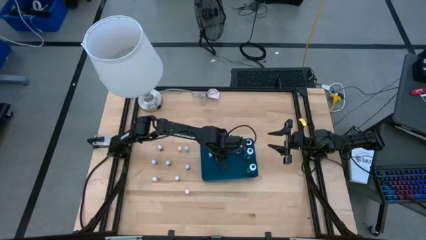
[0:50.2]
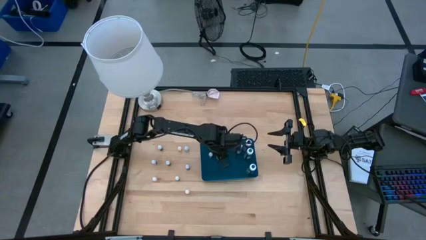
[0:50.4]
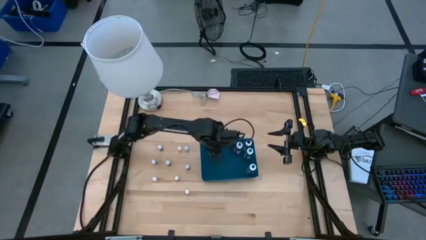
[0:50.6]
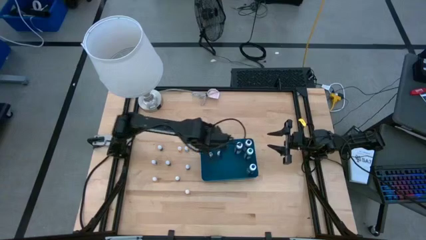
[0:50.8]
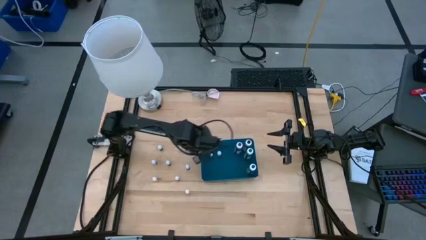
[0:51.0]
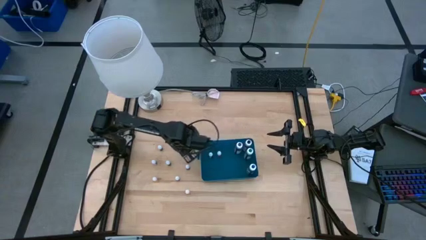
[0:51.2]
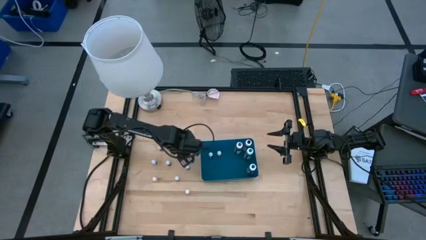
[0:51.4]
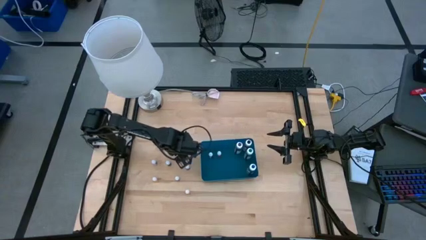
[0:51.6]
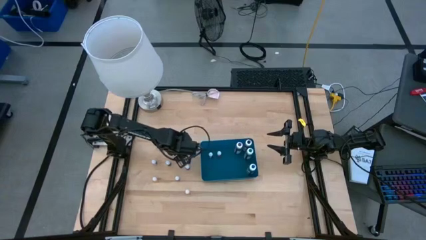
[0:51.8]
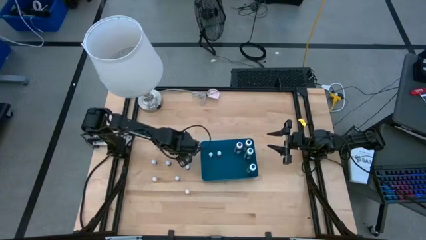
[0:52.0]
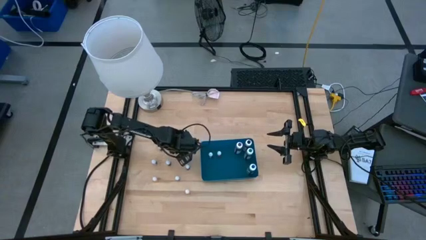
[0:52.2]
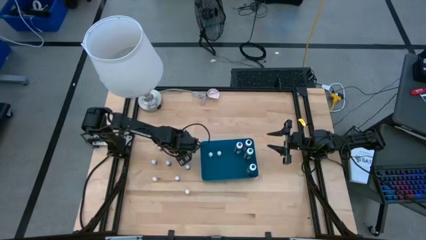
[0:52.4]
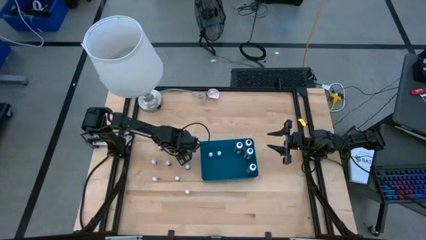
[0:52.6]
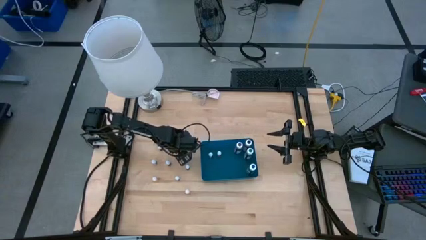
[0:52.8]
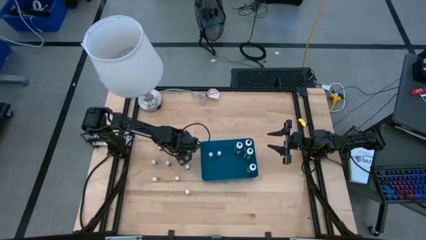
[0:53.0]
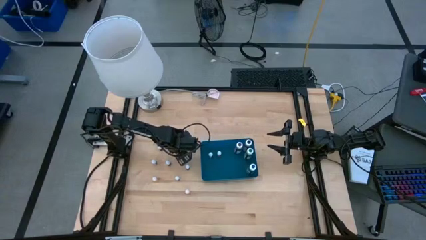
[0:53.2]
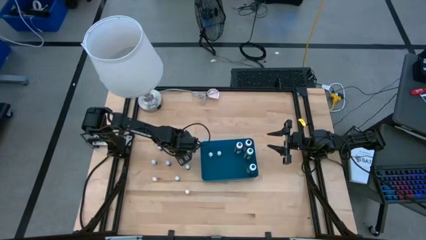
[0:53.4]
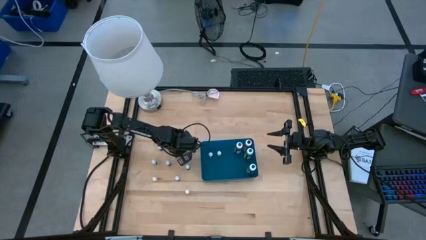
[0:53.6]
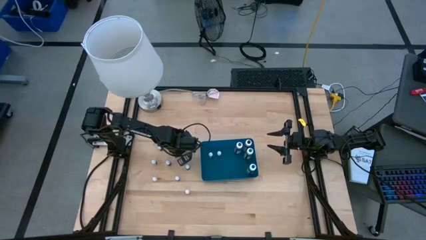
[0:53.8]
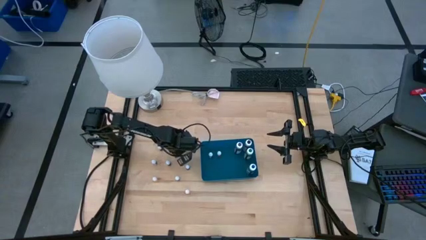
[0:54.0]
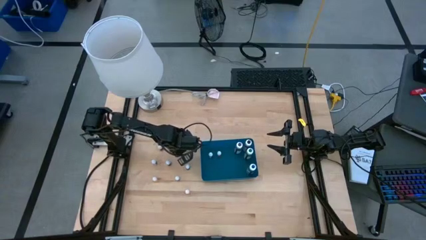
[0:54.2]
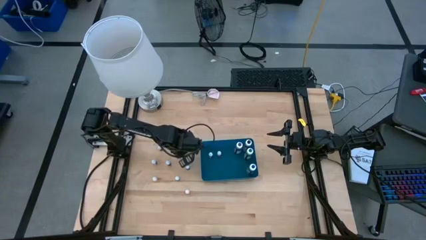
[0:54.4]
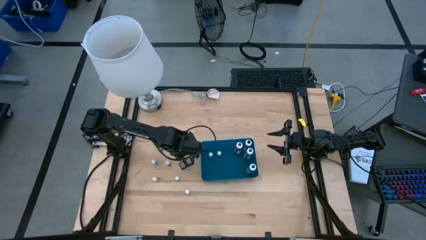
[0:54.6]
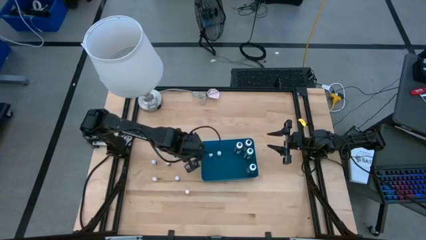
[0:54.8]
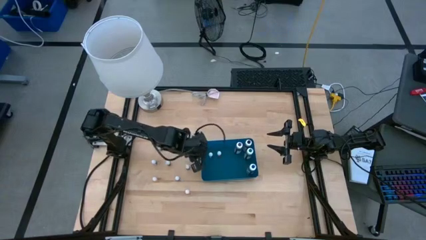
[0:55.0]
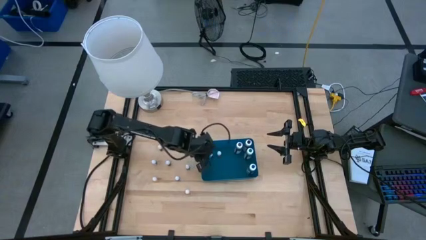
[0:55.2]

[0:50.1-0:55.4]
Task: Pick & Place food coloring
Put the small orange food coloring bottle into the blue bin

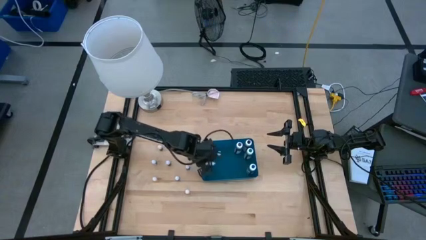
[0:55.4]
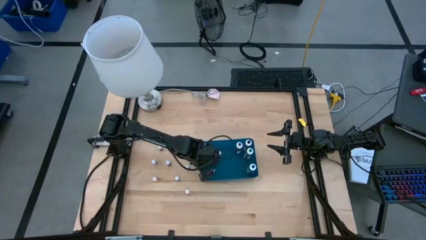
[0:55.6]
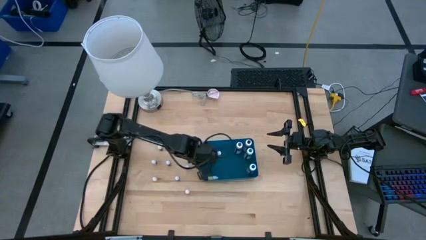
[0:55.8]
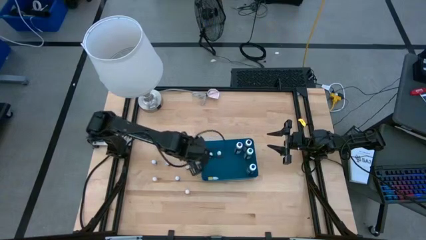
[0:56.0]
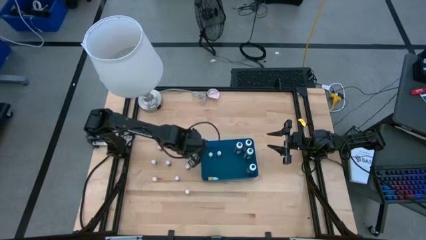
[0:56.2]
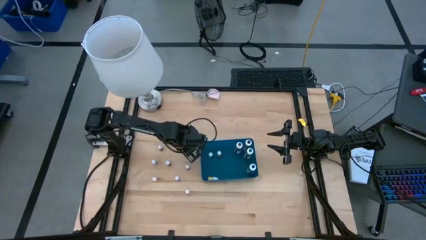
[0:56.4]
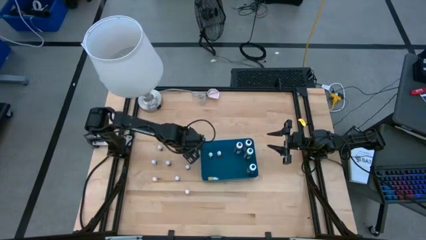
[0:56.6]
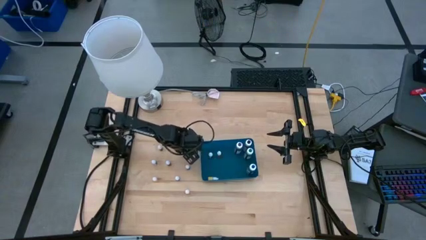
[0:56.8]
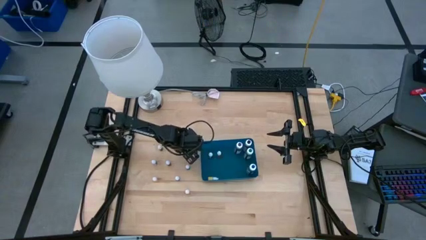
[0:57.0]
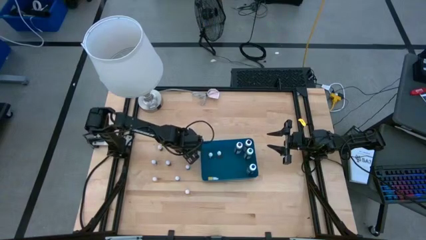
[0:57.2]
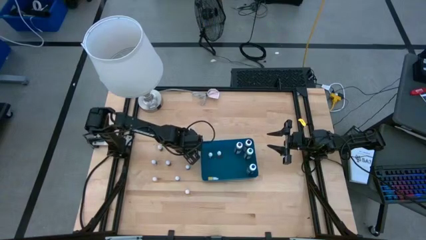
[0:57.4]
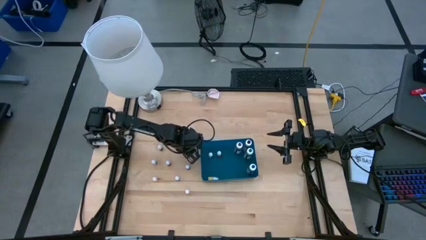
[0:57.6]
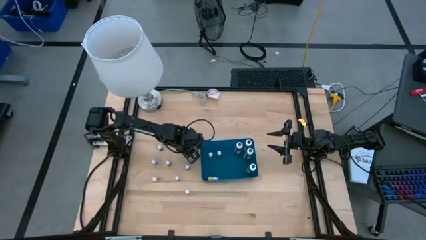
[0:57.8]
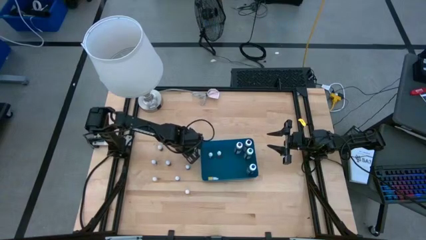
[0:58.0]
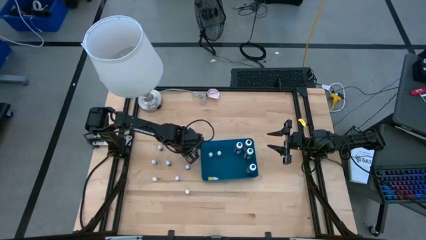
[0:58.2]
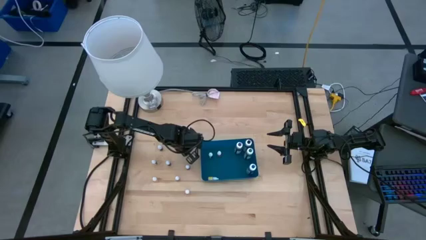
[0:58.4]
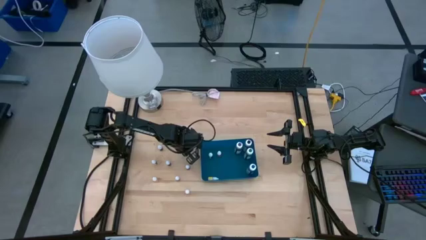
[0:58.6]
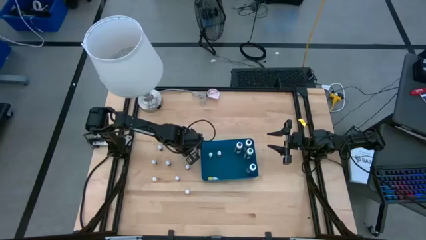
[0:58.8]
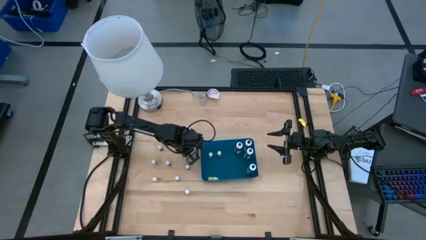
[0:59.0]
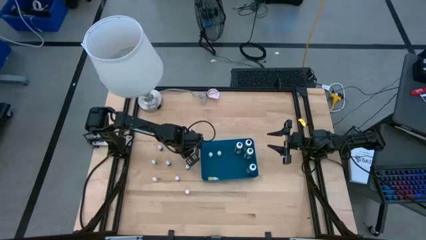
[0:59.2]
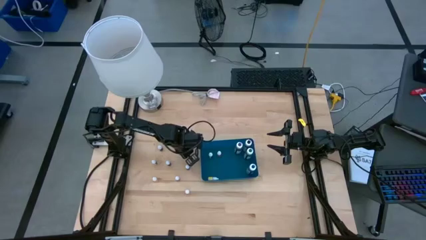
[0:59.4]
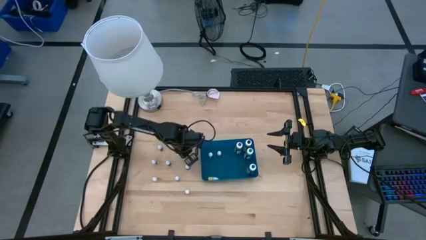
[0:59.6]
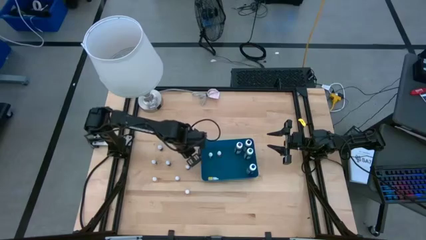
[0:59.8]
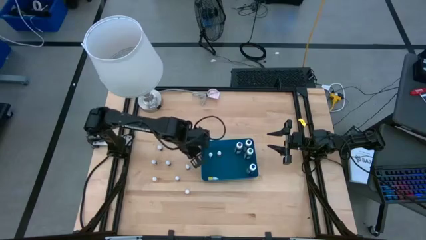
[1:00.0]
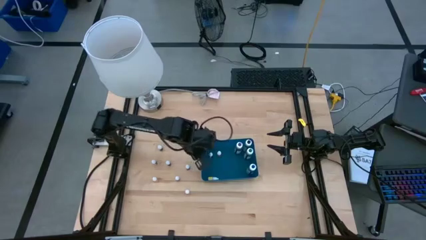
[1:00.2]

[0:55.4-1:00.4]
Put the small blue food coloring bottle into the blue bin

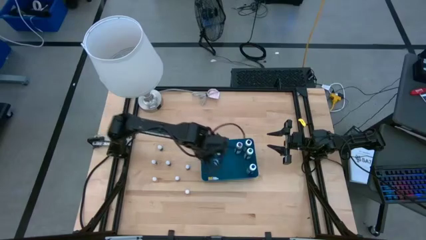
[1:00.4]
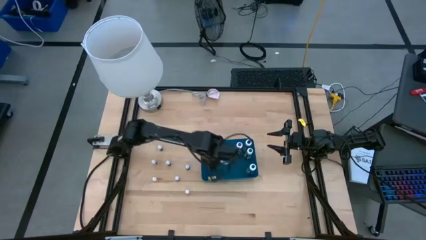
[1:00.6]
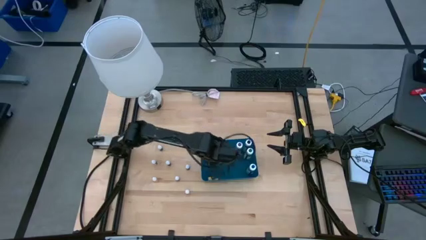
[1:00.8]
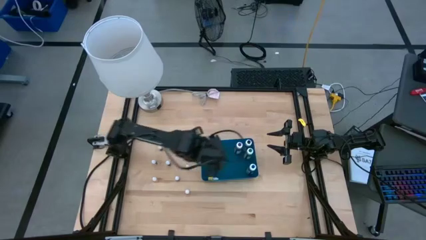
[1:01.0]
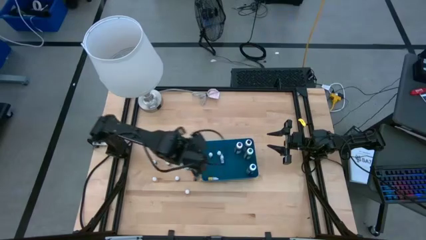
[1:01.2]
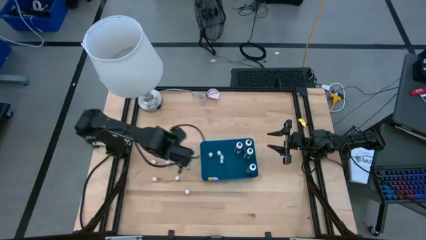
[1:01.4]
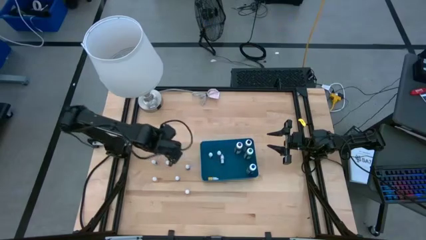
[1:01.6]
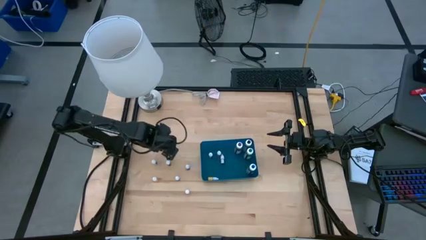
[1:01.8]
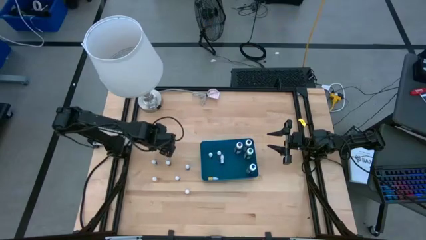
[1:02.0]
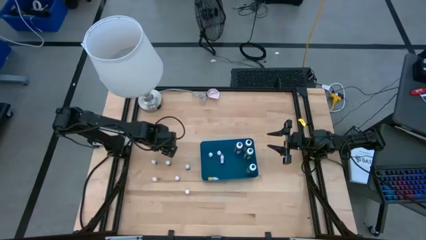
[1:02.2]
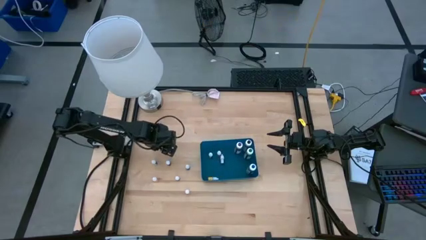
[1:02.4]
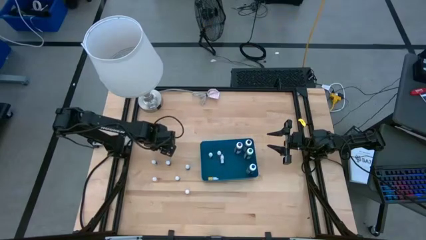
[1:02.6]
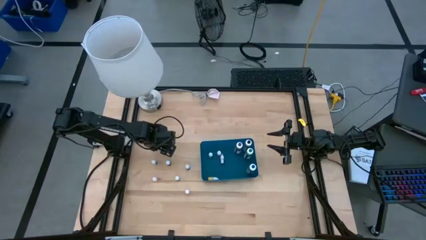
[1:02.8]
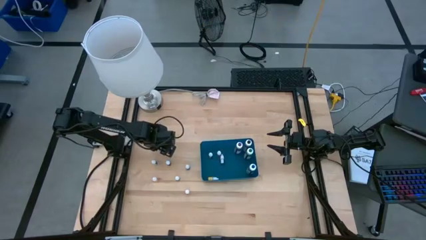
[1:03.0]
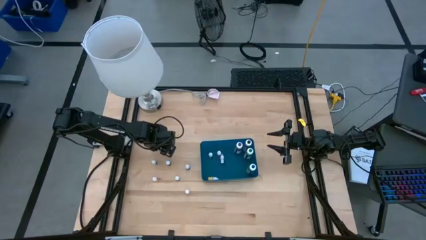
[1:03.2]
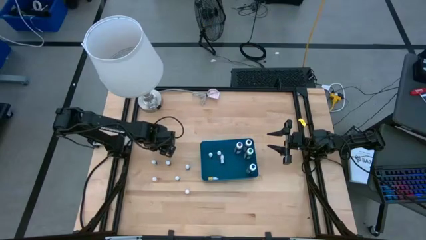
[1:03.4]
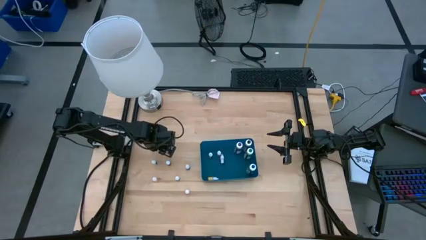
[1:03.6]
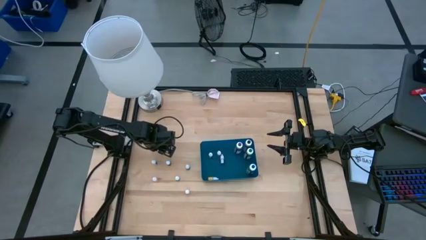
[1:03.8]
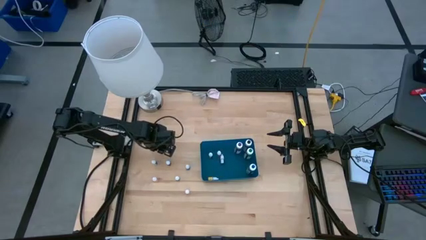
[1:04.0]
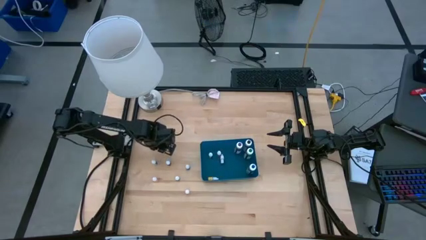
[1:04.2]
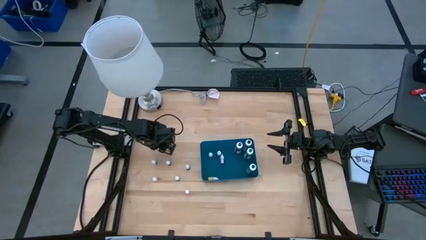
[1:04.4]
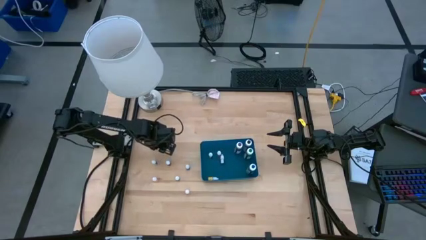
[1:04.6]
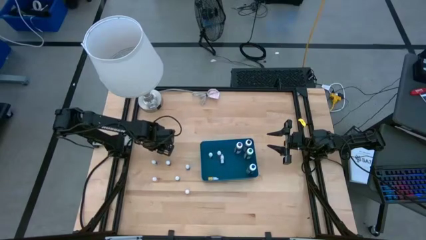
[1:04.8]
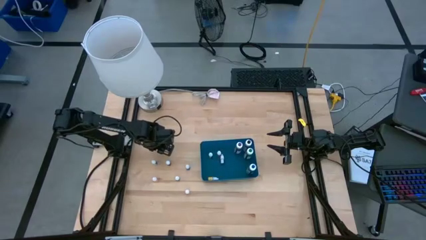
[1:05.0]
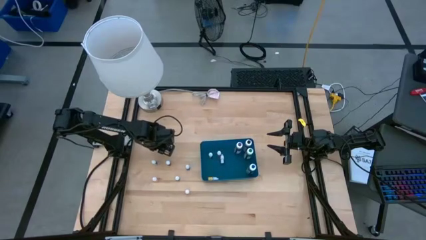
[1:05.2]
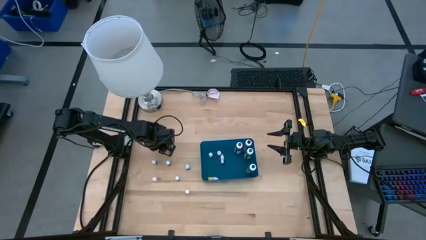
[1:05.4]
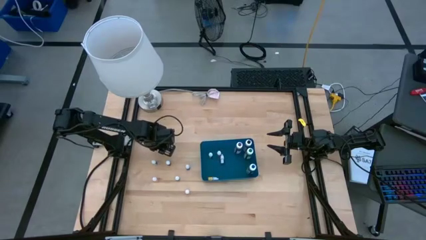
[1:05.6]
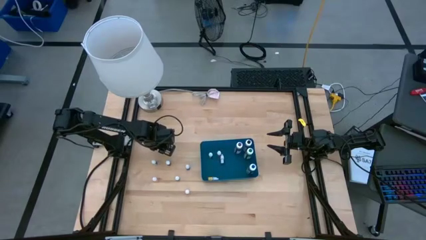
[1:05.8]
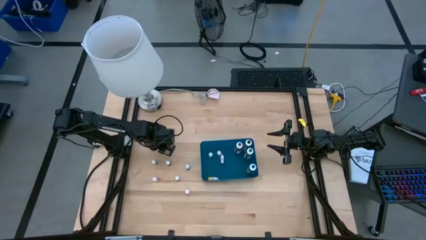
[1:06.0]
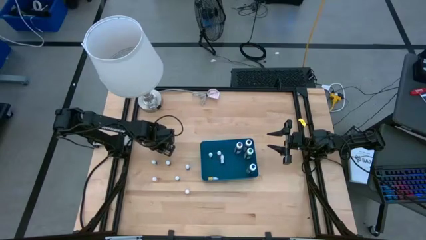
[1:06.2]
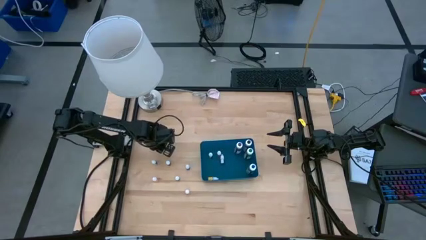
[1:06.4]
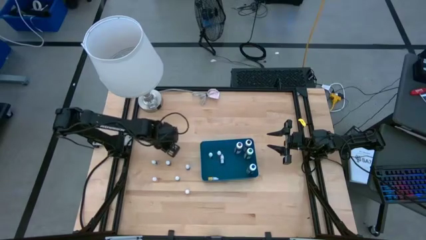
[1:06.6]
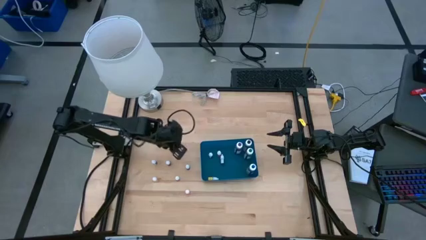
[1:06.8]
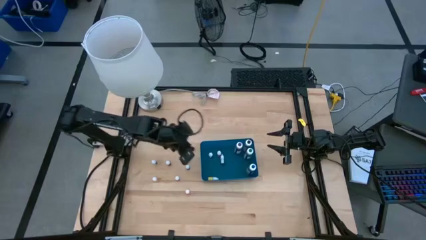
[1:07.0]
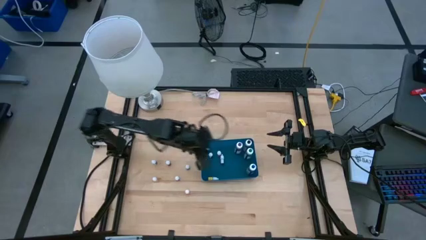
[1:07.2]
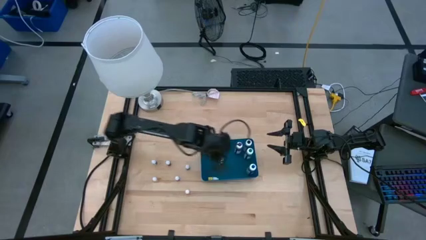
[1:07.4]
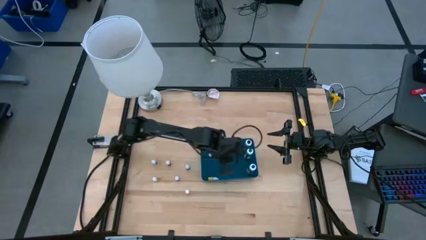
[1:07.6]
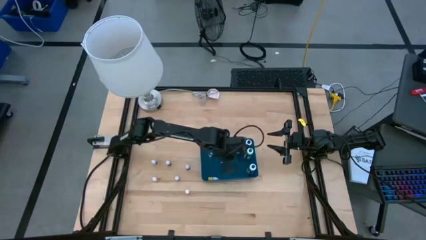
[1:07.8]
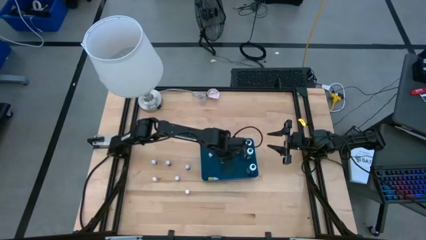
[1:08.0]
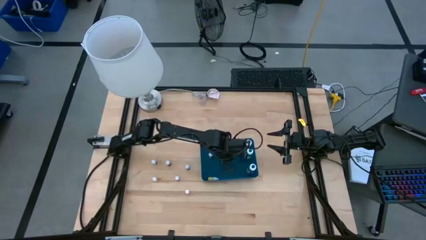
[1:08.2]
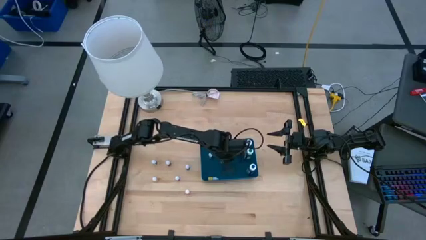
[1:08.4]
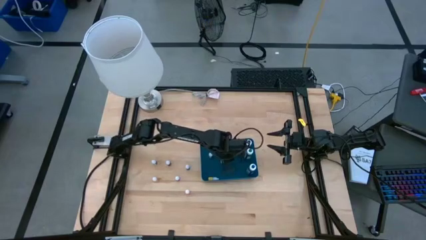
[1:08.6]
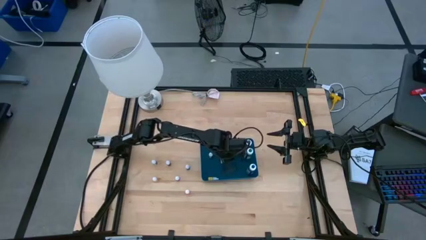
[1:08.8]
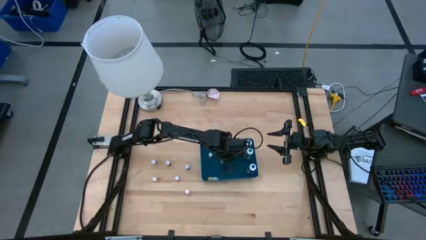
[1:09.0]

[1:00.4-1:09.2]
Put the small purple food coloring bottle into the blue bin
